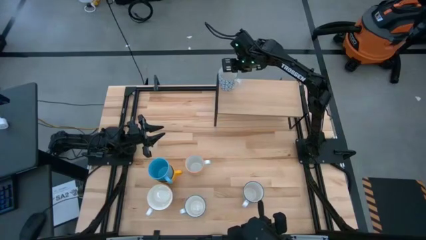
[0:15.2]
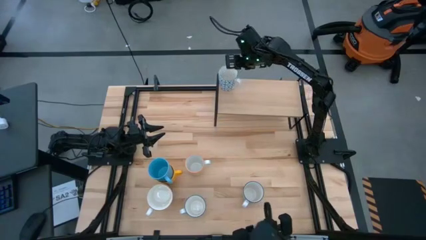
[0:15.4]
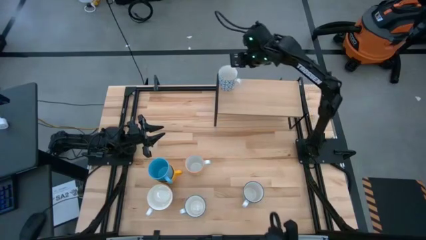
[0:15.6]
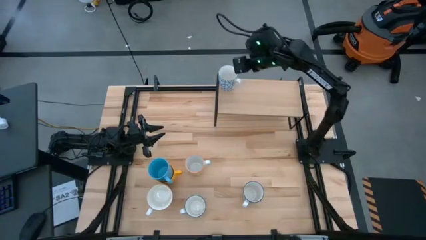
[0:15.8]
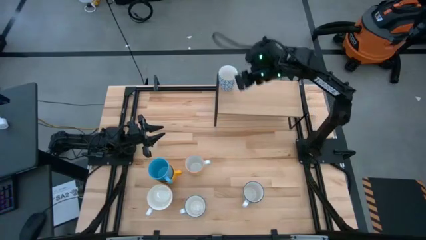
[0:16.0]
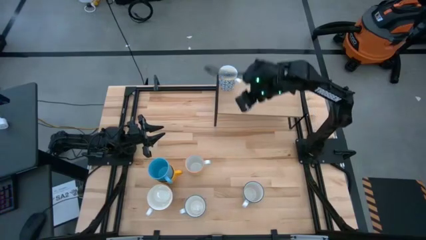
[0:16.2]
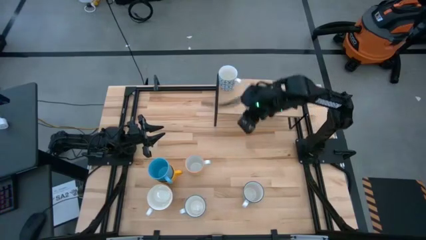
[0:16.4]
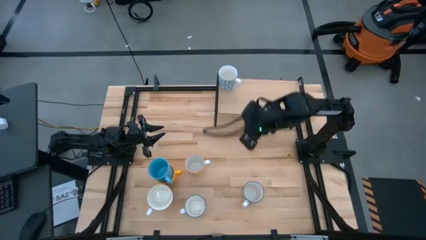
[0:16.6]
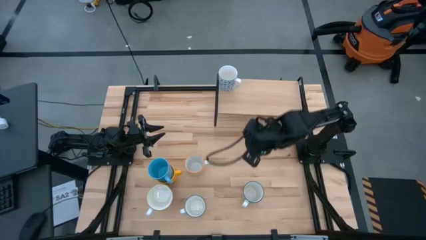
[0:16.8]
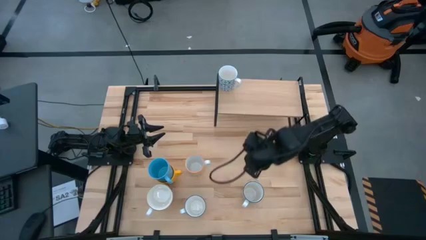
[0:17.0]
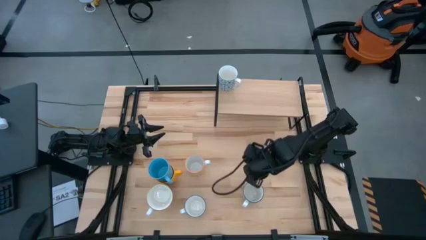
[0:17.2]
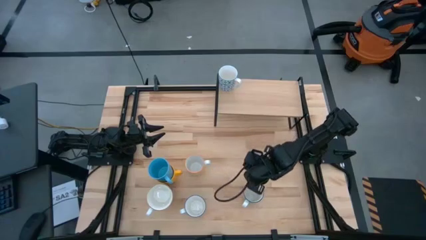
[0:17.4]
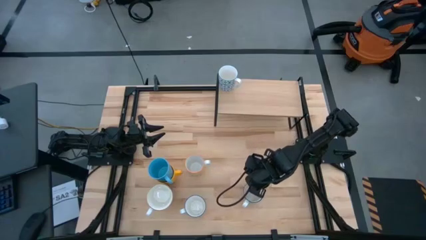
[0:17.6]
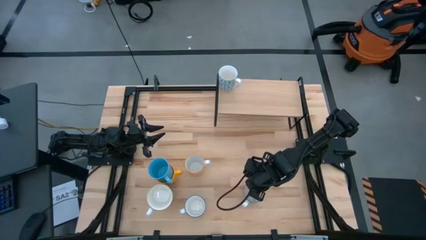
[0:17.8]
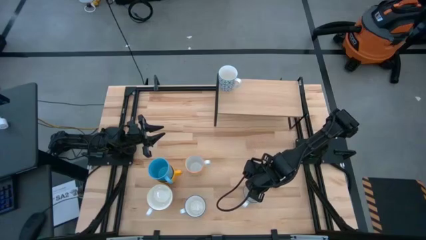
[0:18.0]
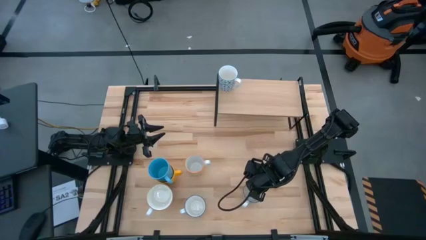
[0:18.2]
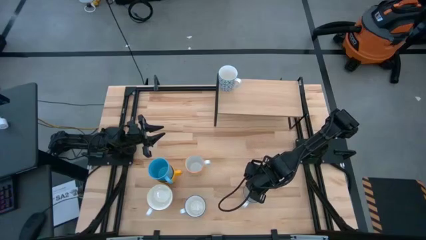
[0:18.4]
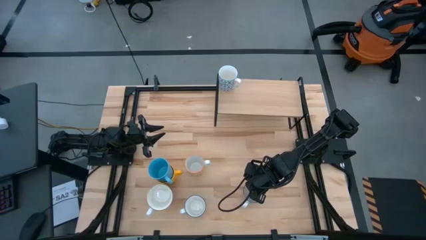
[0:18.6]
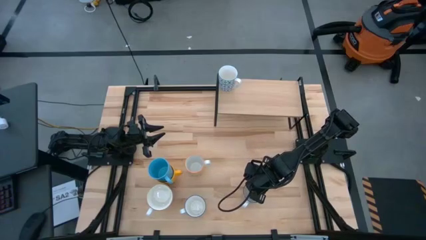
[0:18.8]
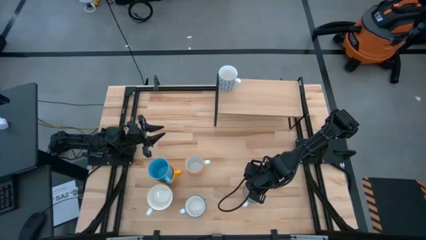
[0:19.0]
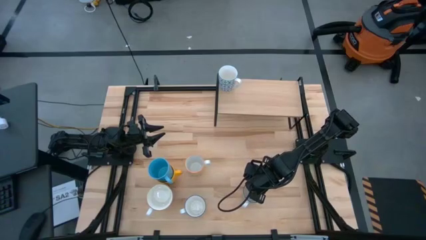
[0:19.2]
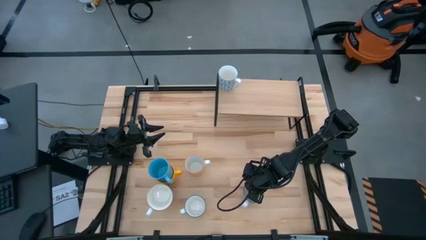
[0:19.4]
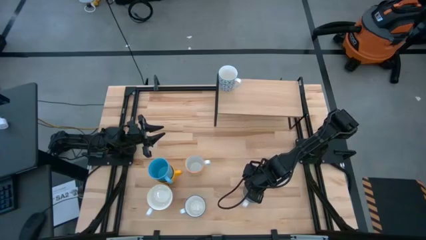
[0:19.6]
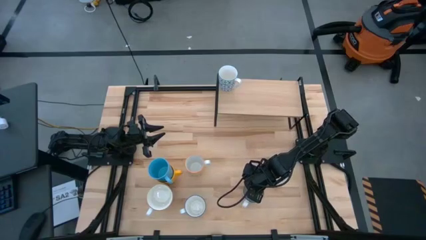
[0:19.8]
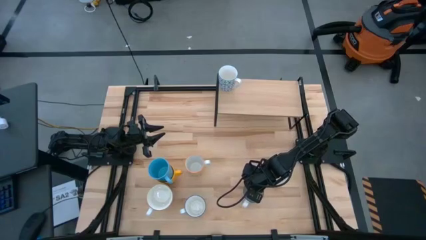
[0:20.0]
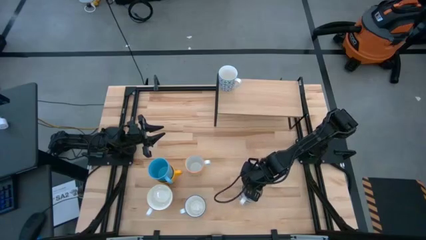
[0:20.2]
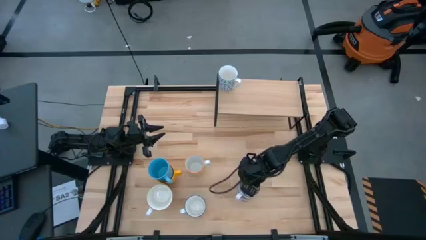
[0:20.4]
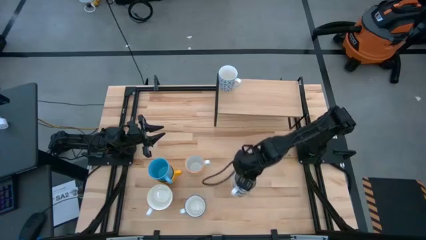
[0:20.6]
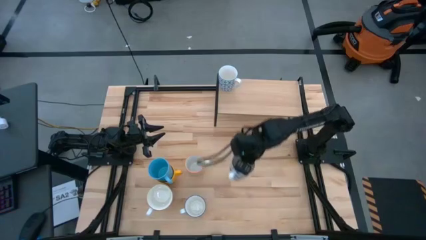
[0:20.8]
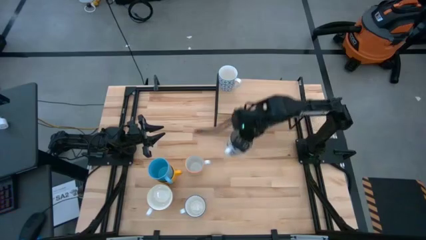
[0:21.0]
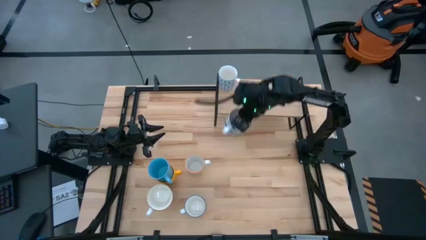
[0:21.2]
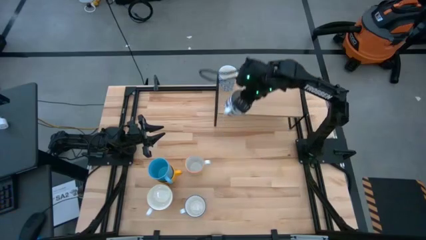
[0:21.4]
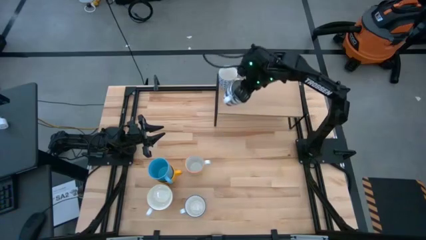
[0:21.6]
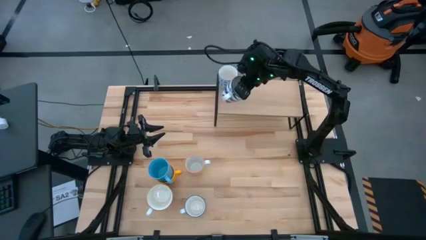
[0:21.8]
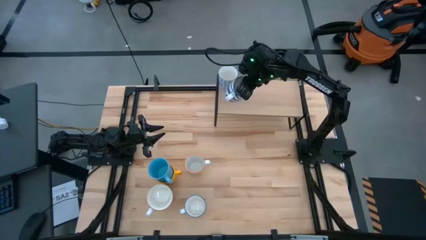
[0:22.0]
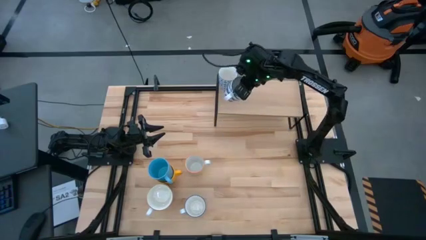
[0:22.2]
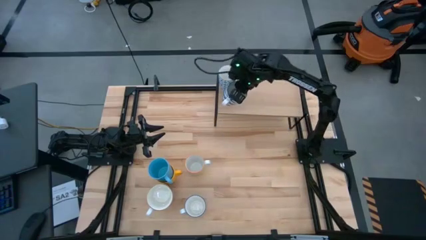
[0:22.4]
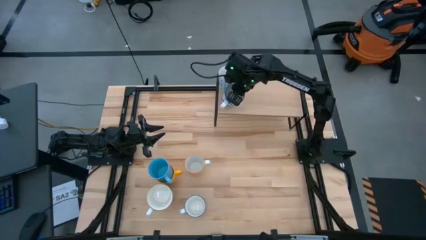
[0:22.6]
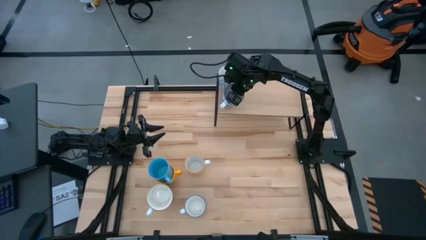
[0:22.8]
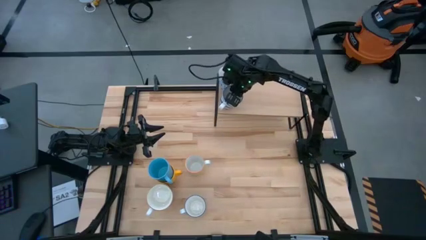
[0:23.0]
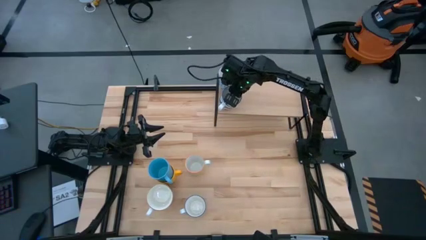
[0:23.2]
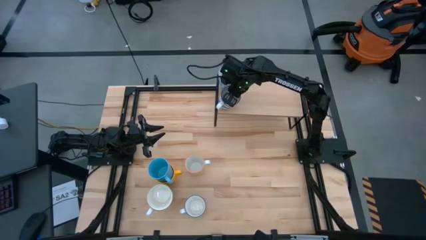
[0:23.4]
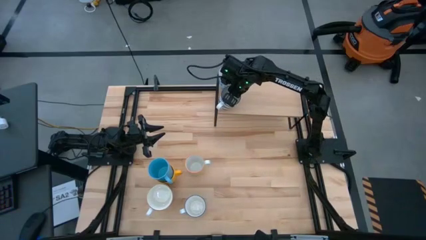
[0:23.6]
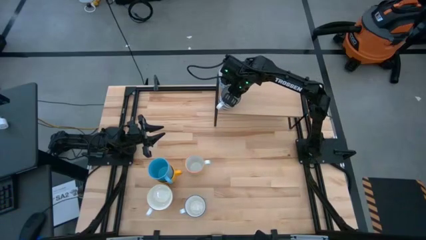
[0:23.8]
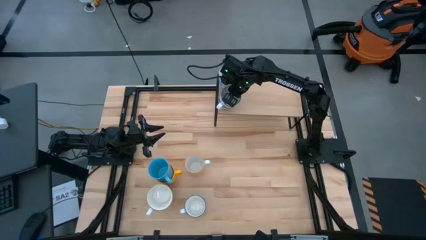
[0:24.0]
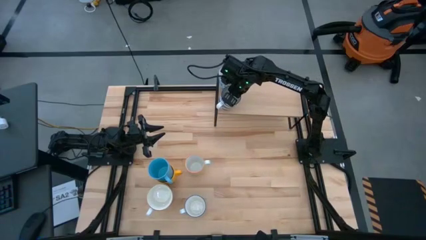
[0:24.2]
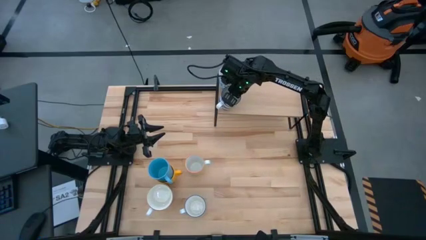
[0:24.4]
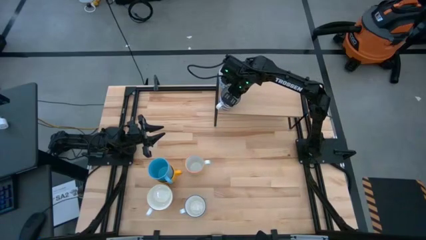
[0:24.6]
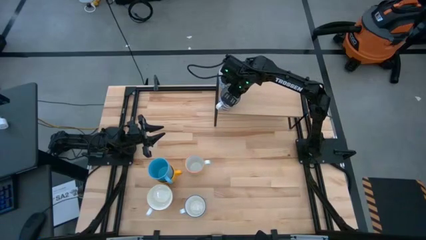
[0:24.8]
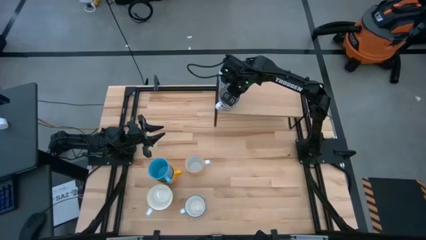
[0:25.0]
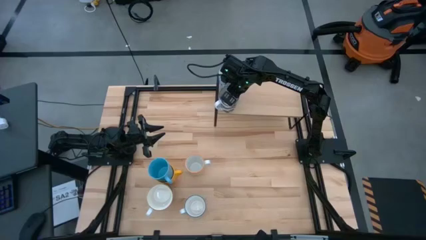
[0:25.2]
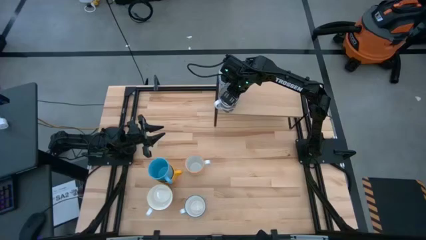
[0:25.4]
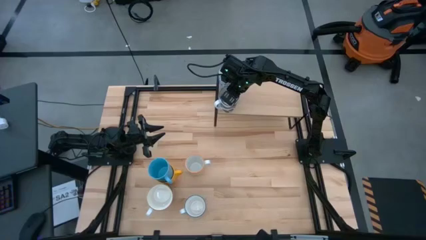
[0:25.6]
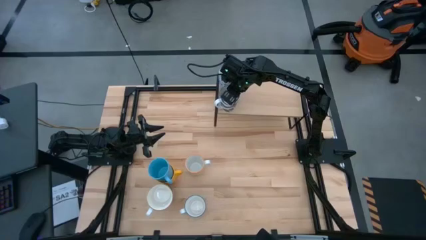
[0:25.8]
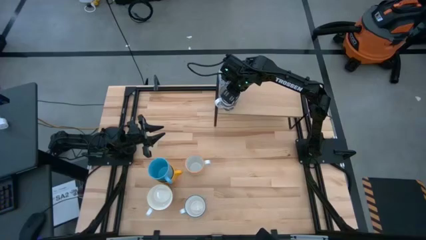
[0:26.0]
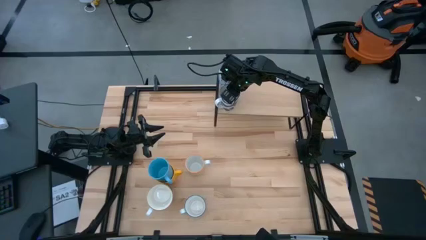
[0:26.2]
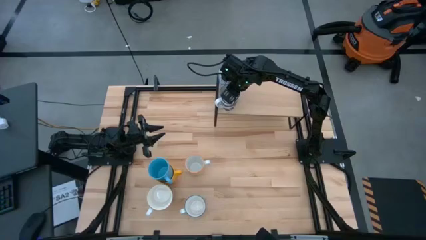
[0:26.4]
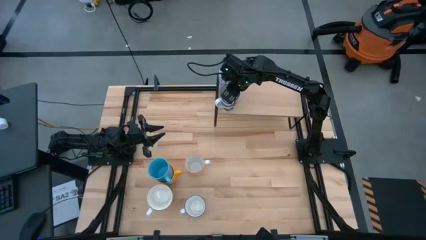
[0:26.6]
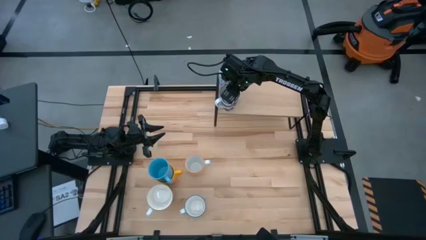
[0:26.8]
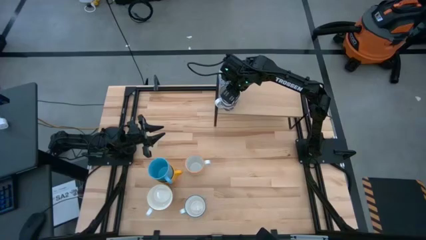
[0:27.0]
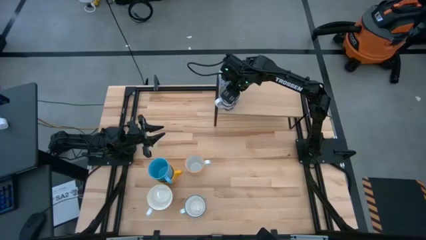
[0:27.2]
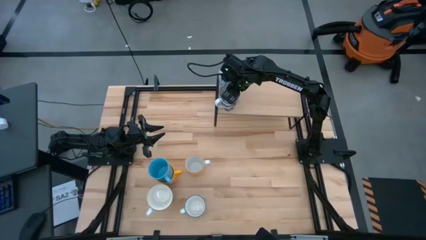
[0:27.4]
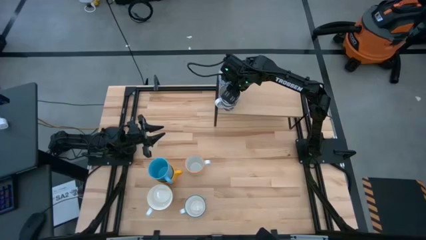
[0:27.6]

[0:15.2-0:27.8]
Task: Place coffee mugs
Put the light blue pattern mug on the shelf
